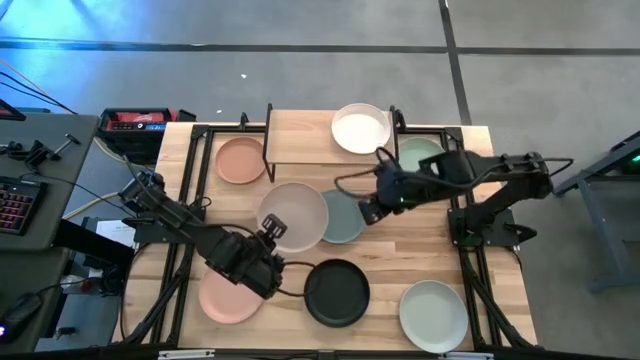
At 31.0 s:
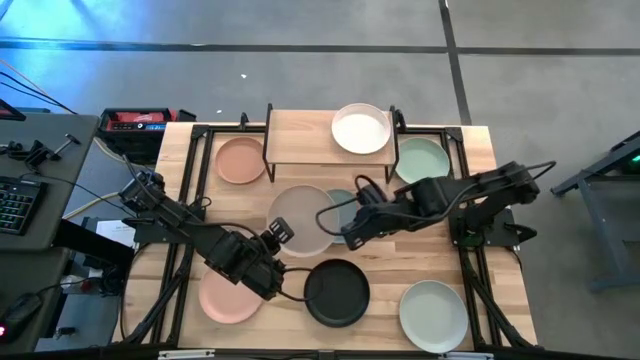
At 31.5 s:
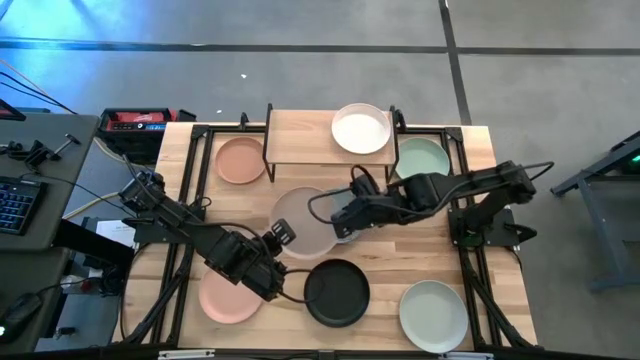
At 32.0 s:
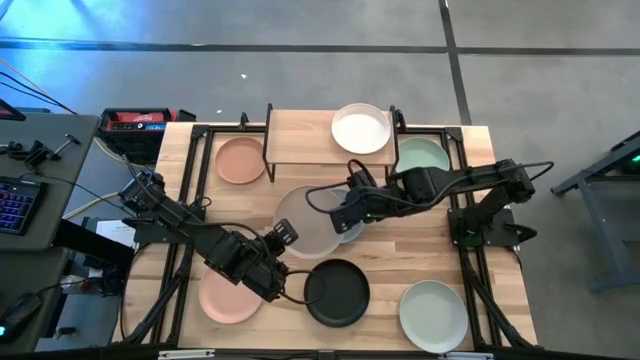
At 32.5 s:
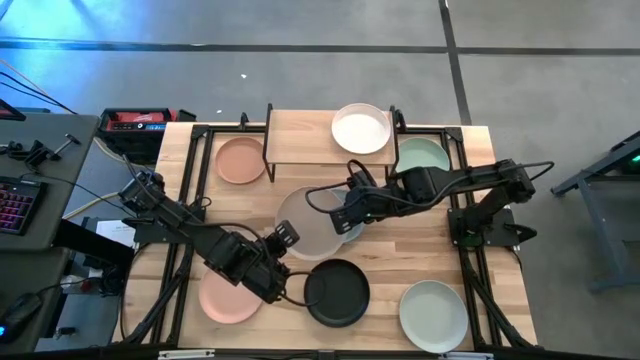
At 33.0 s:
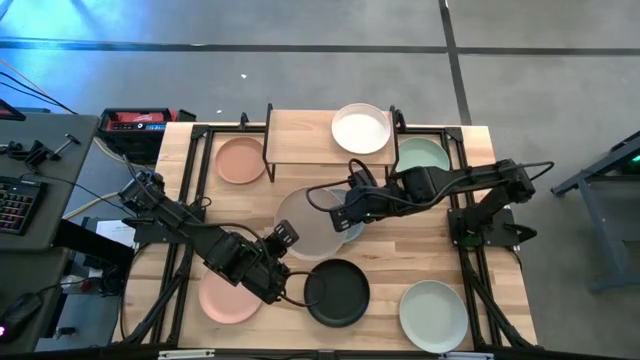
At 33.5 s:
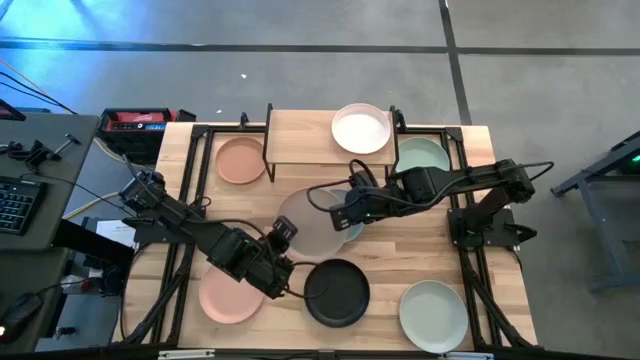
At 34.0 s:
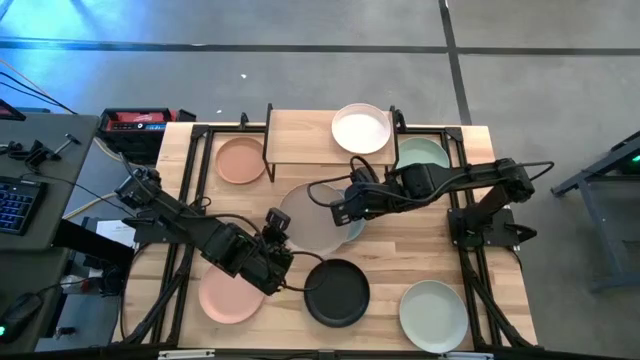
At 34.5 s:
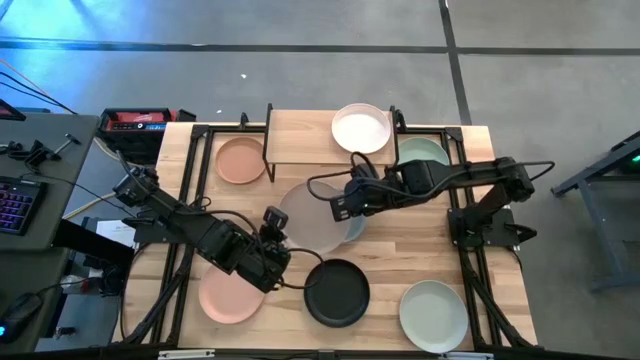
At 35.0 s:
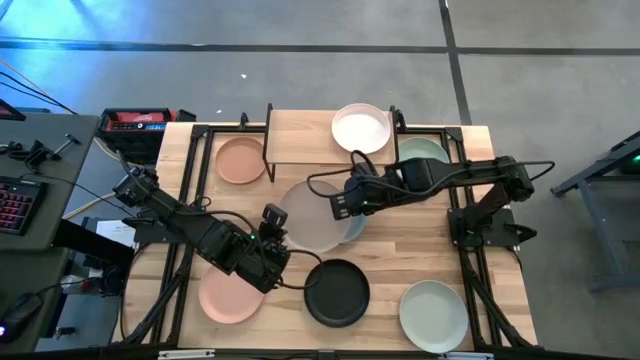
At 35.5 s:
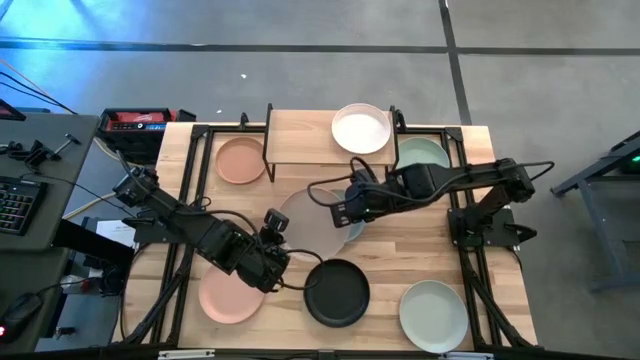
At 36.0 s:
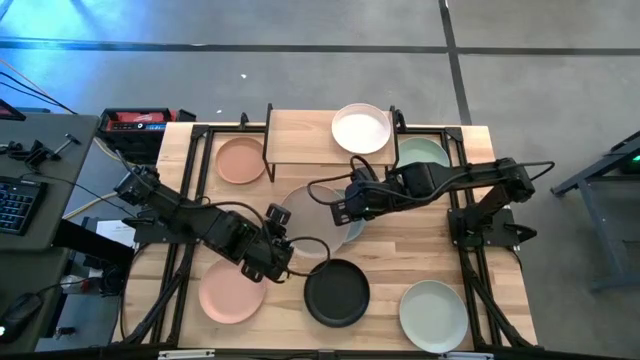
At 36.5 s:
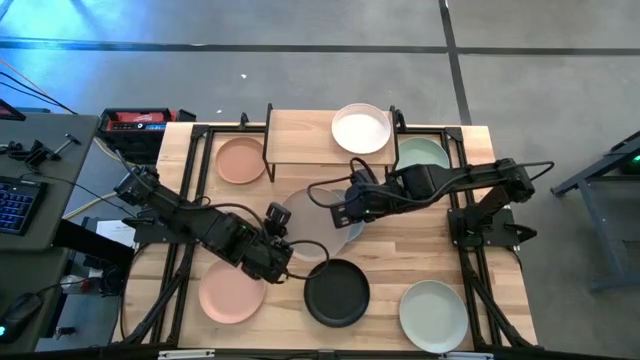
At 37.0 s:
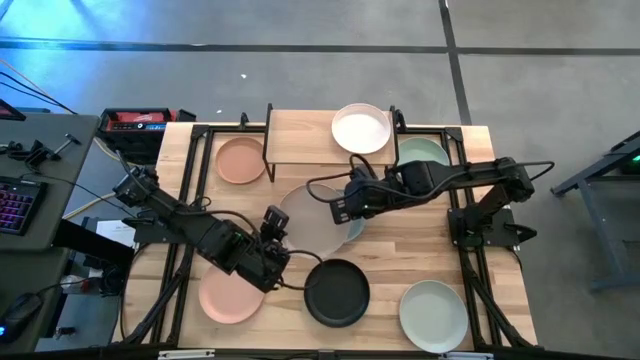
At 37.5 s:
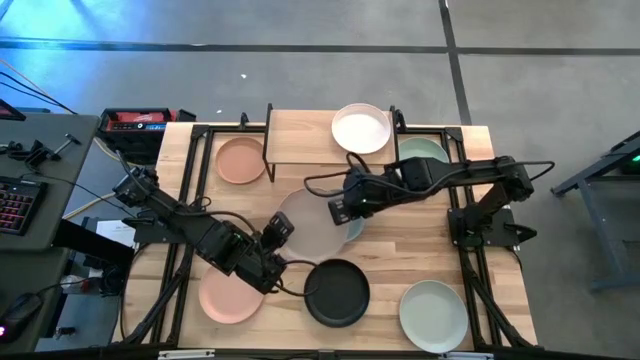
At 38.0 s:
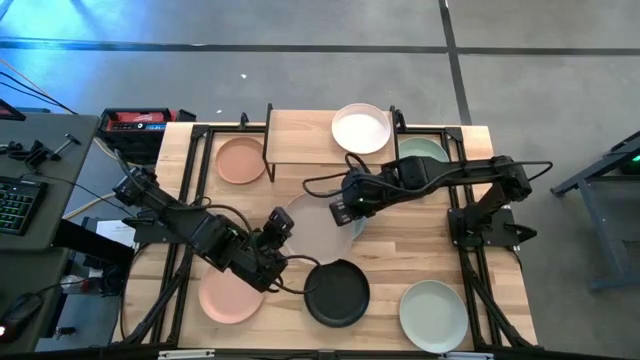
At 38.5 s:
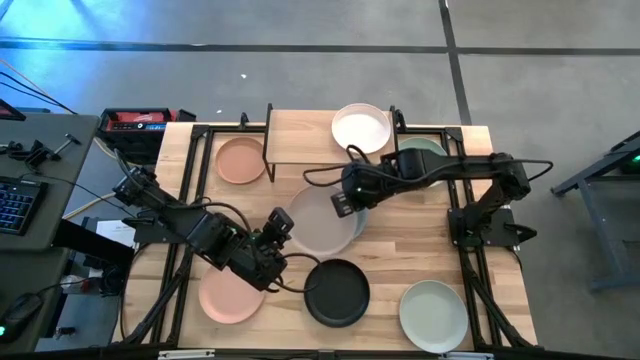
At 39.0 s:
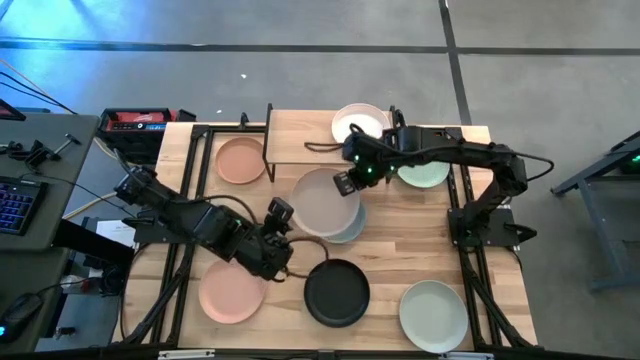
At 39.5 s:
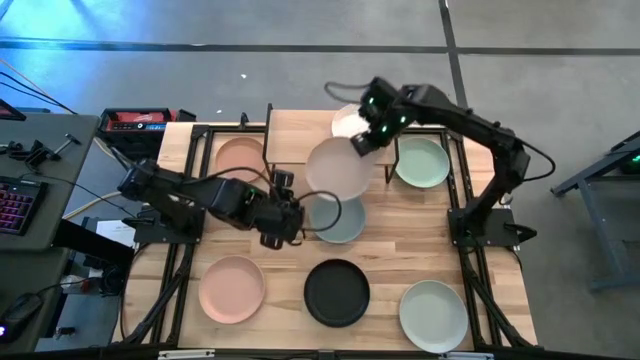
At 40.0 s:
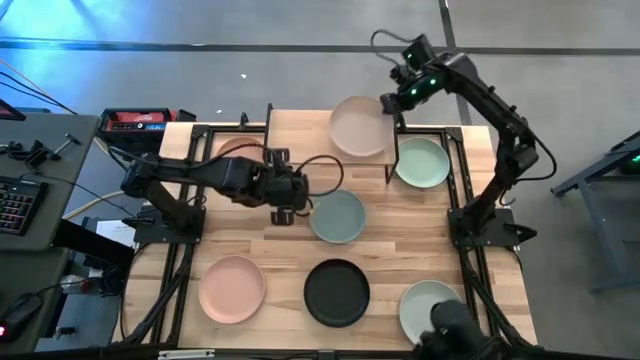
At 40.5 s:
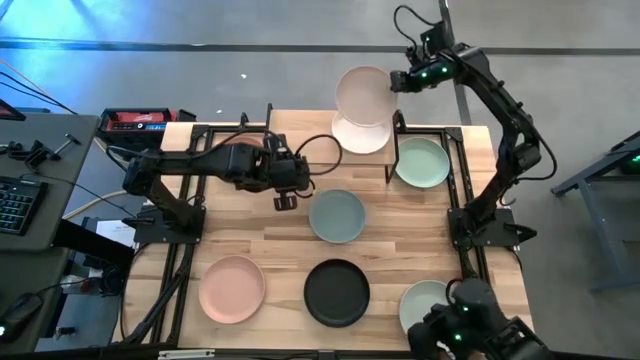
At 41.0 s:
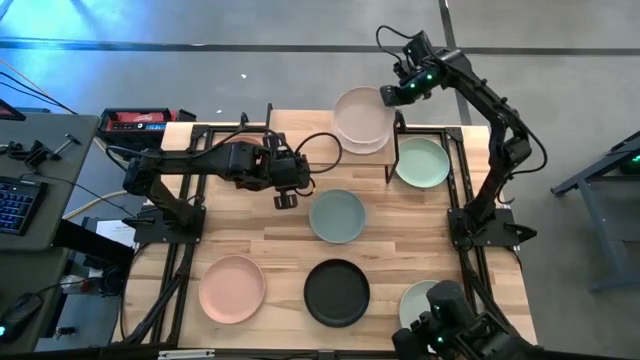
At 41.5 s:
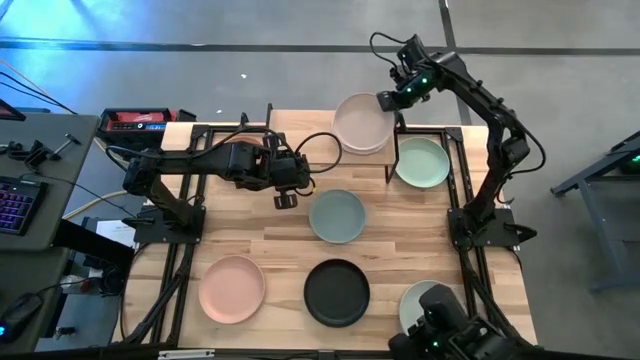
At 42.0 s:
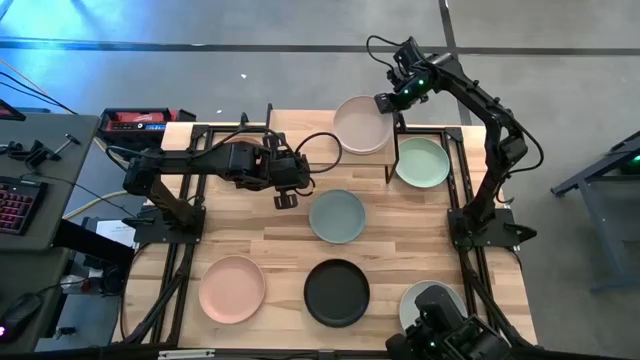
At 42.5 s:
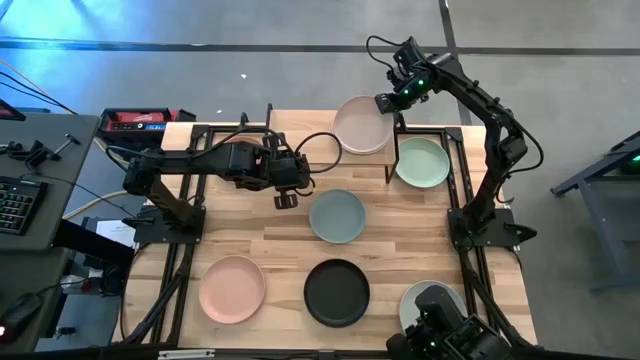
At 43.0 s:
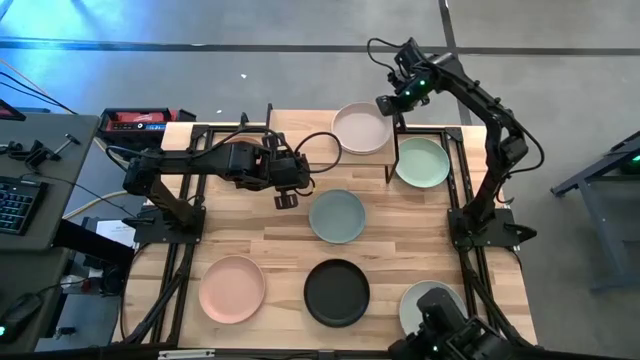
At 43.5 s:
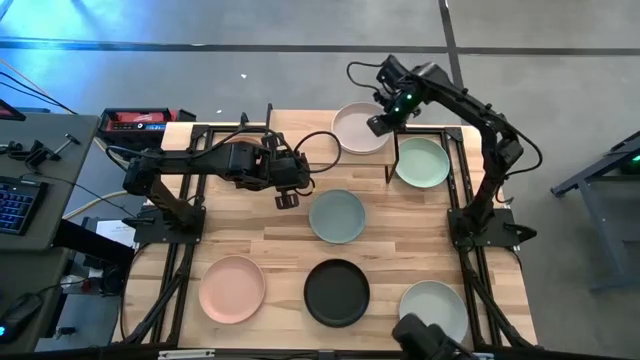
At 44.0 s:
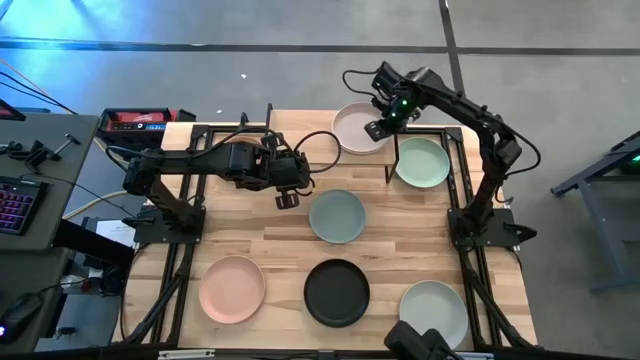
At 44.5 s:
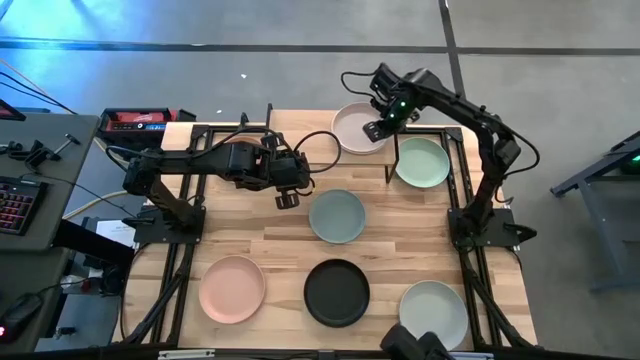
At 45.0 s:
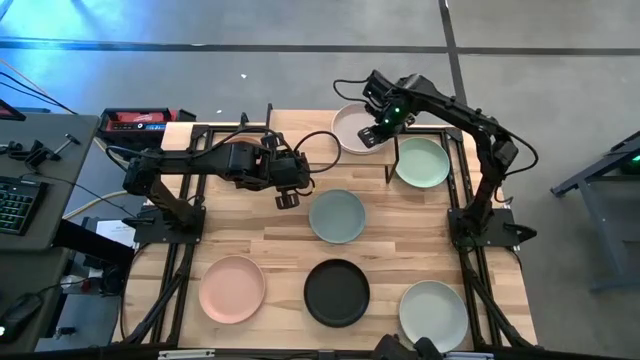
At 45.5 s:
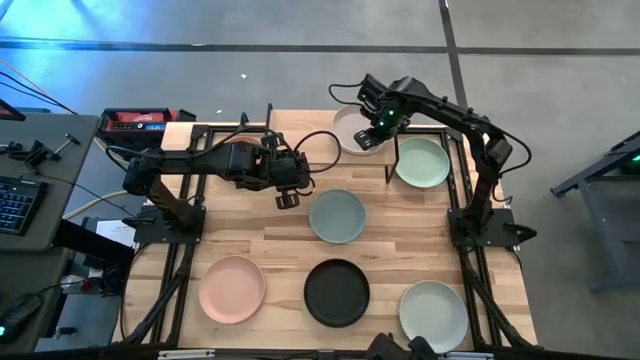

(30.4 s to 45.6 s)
Task: Place and stack plates onto a shelf
Stack the light brown plate on top of the other white plate on the shelf

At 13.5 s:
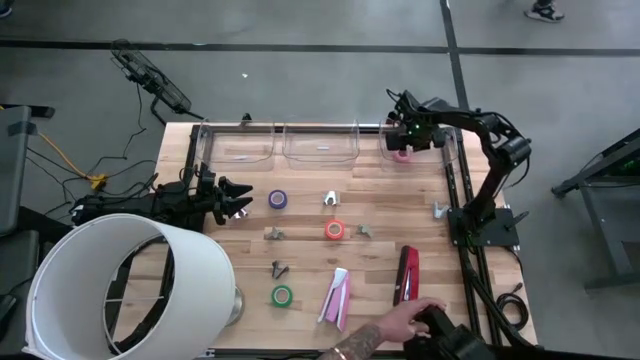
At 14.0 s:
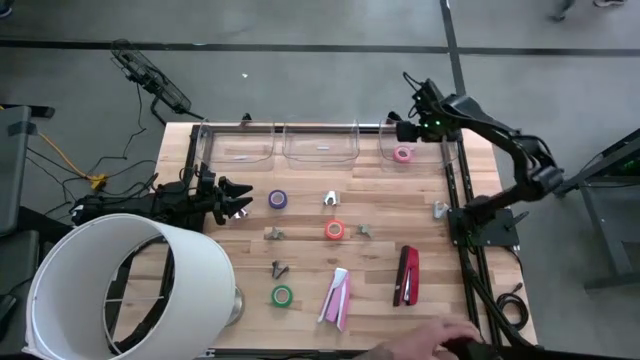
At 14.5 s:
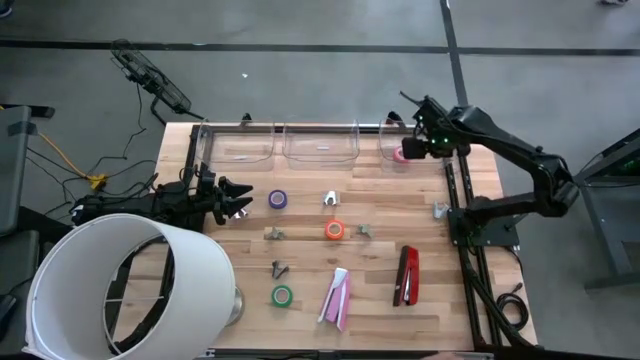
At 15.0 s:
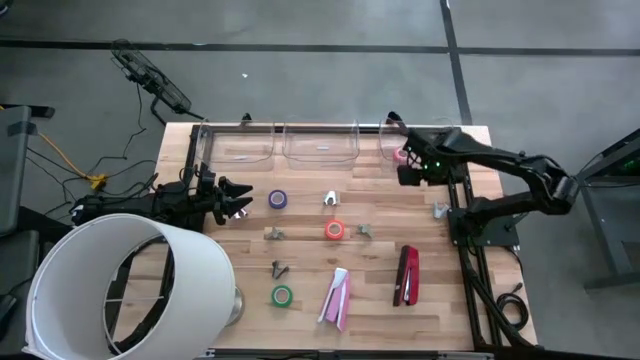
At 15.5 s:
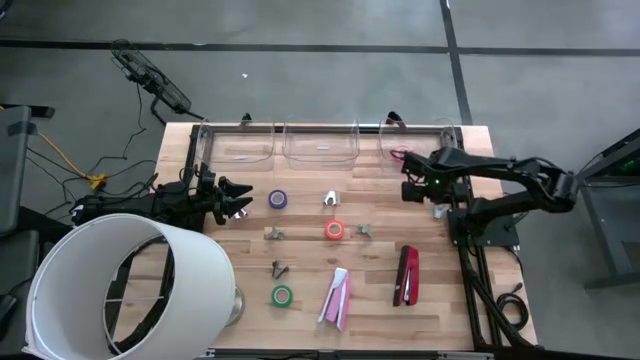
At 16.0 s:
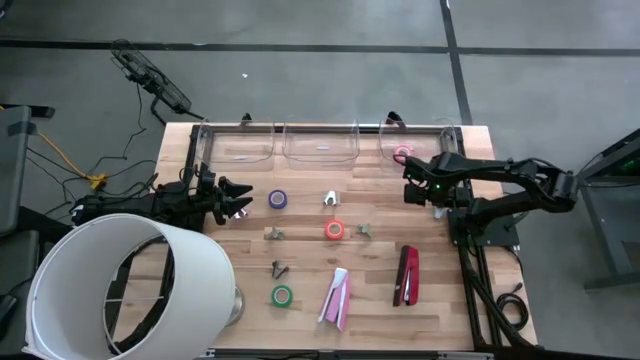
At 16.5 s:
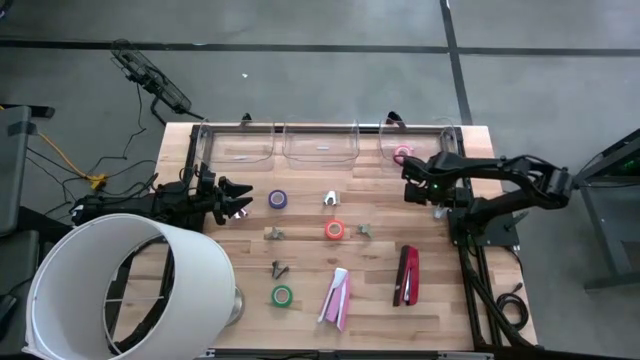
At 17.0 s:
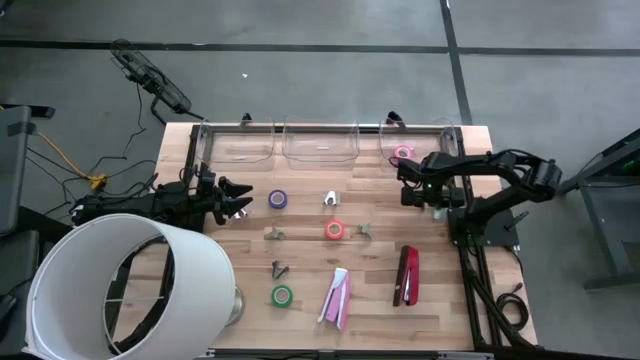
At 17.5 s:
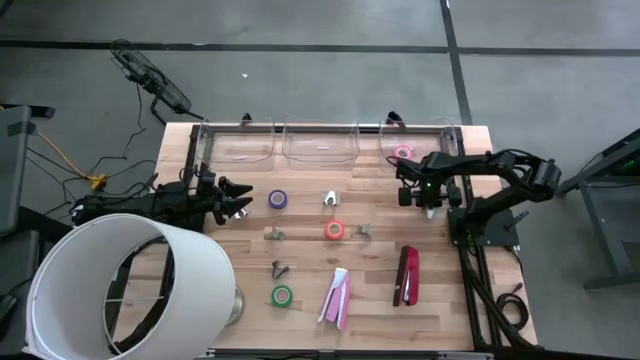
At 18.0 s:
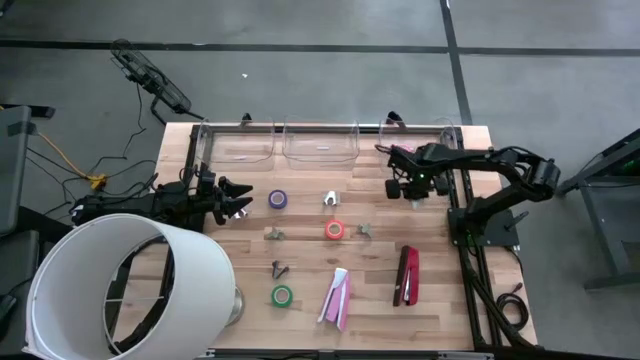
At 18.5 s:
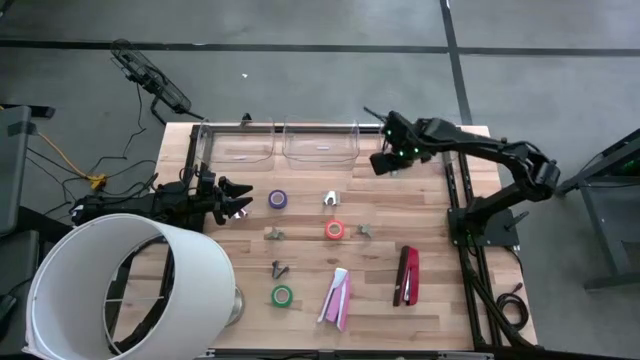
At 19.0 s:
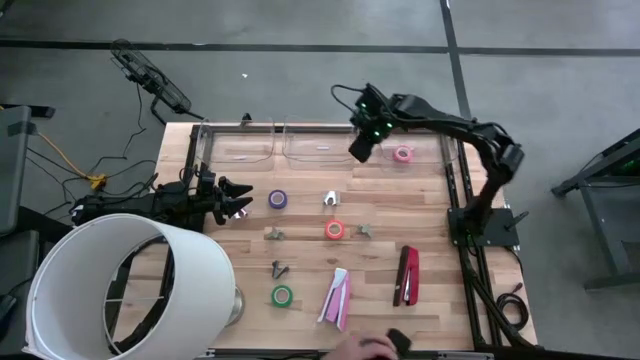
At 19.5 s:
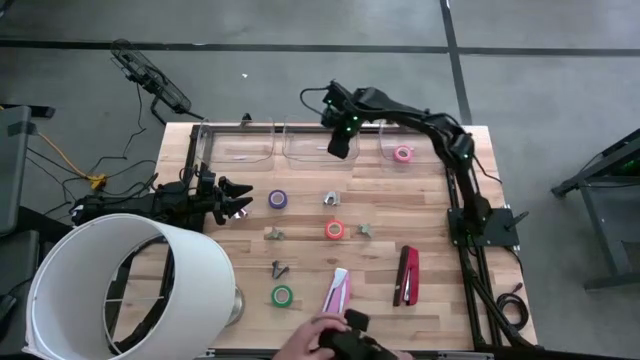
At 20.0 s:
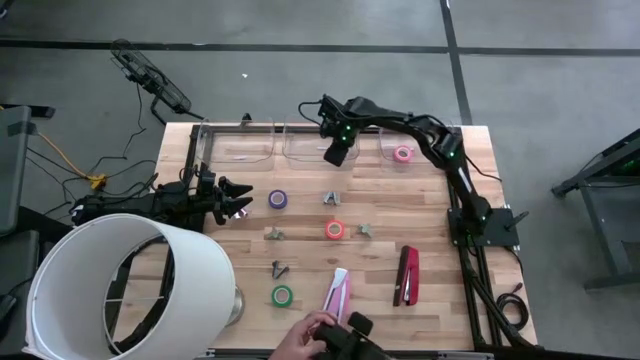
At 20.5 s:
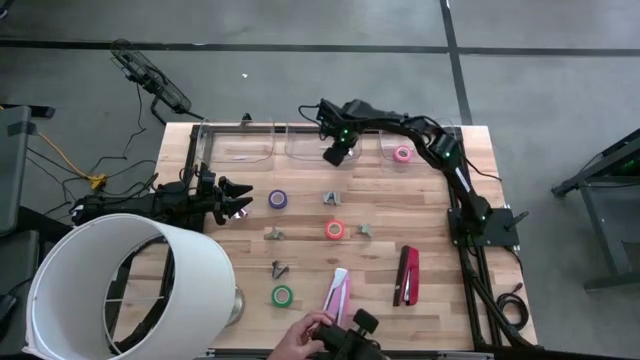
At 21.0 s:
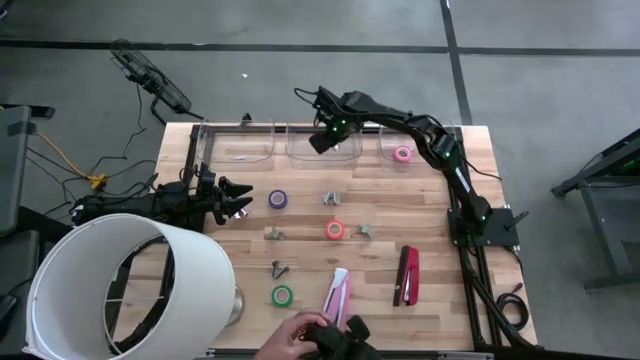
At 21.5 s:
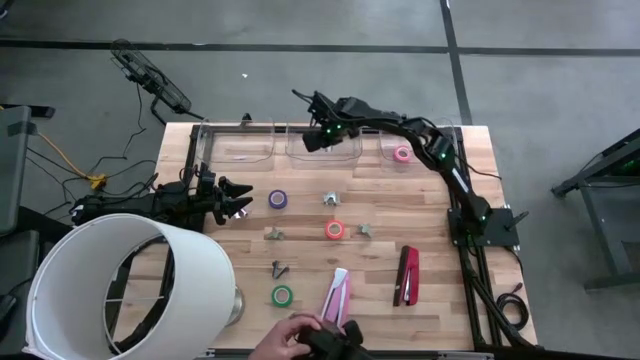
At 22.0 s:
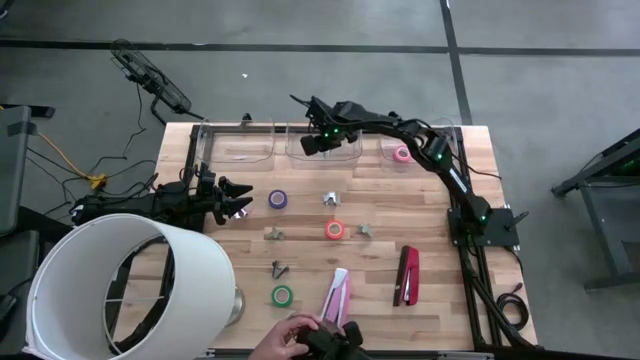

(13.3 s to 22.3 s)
Task: Pick and place Stapler, Stapler remover, tape
Put the right blue stapler remover into the middle transparent bin
